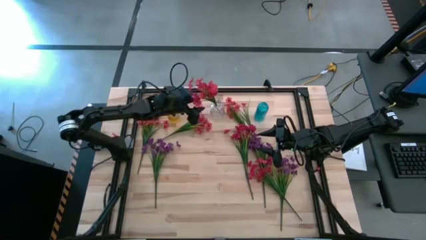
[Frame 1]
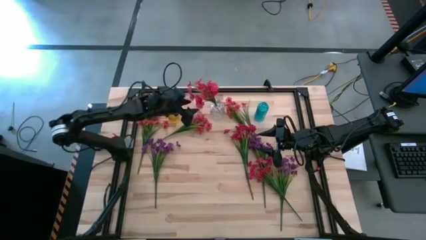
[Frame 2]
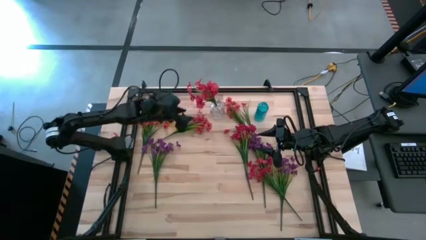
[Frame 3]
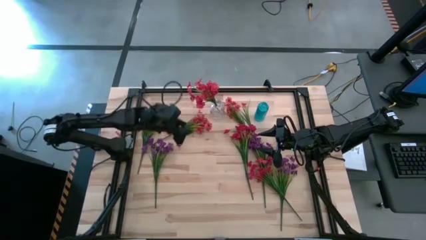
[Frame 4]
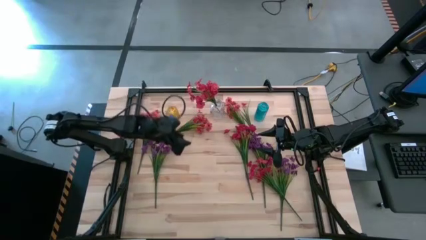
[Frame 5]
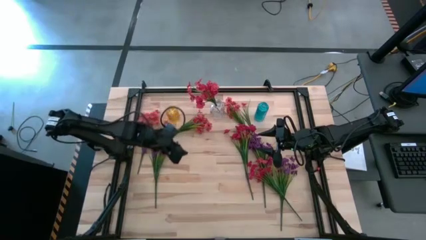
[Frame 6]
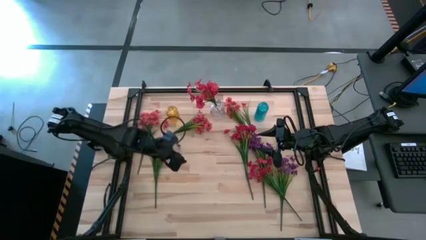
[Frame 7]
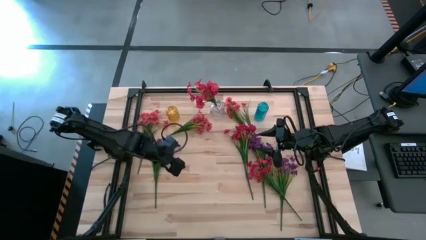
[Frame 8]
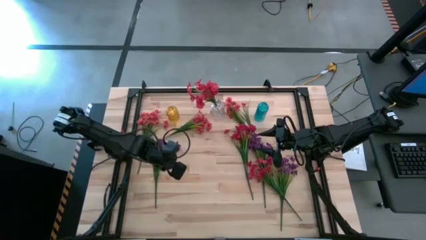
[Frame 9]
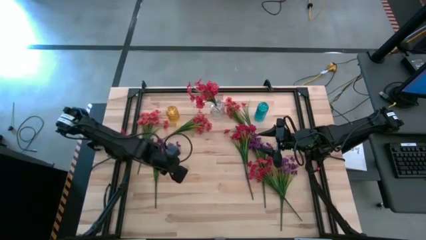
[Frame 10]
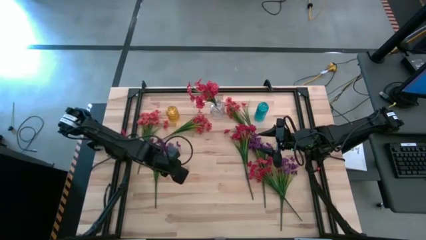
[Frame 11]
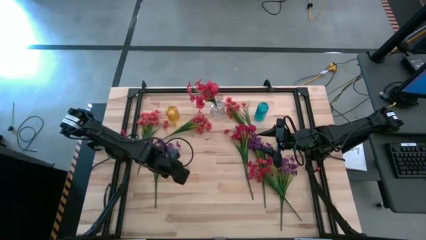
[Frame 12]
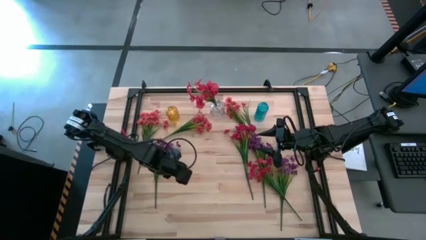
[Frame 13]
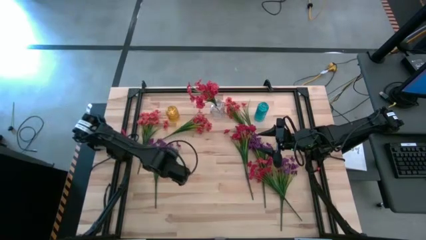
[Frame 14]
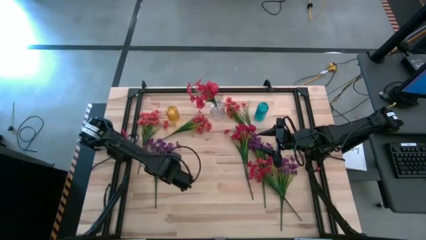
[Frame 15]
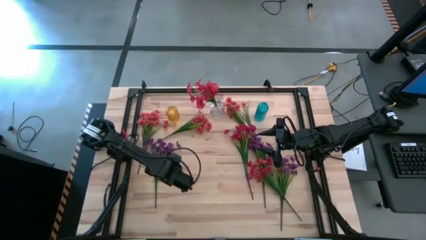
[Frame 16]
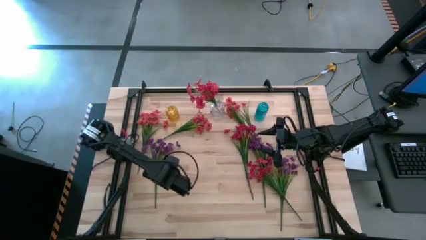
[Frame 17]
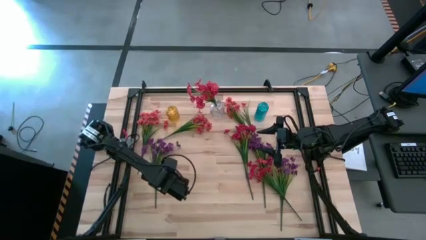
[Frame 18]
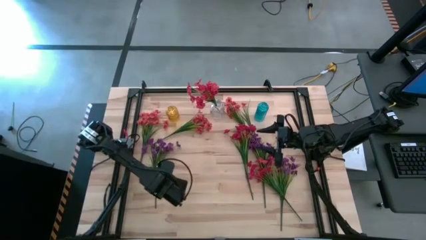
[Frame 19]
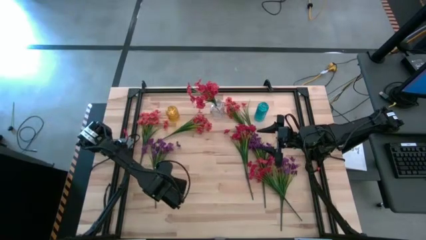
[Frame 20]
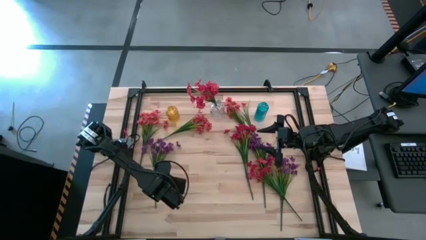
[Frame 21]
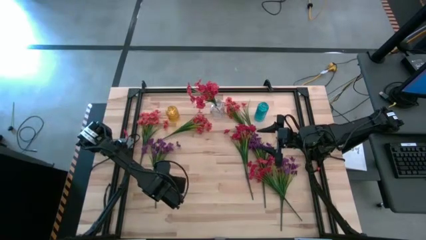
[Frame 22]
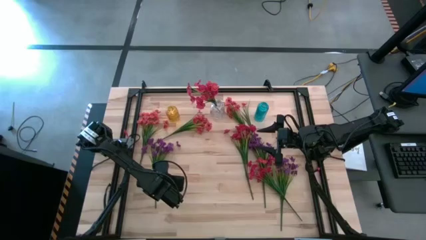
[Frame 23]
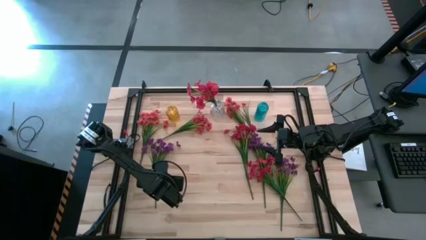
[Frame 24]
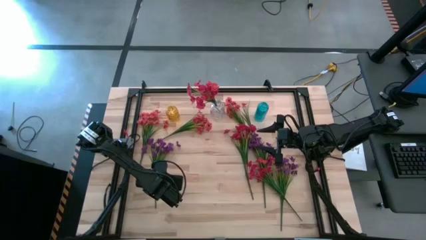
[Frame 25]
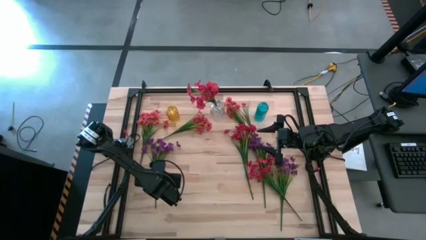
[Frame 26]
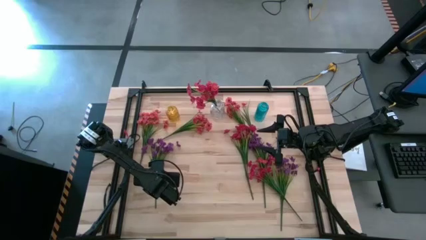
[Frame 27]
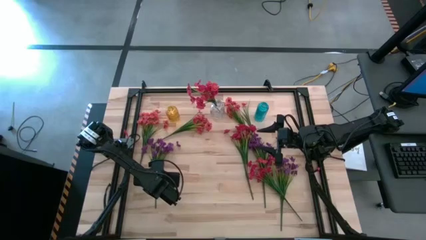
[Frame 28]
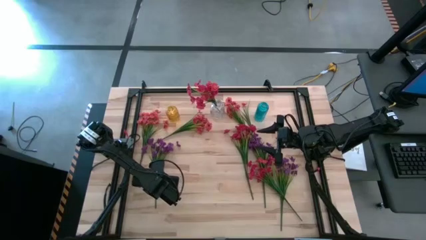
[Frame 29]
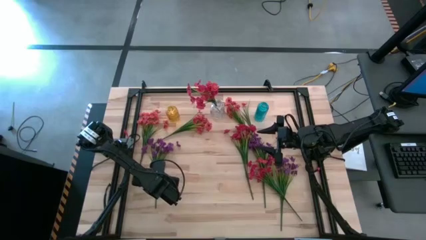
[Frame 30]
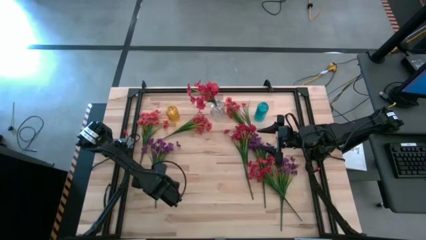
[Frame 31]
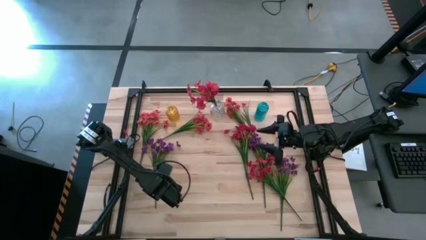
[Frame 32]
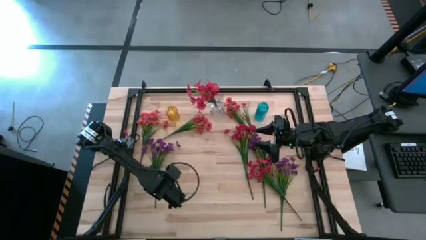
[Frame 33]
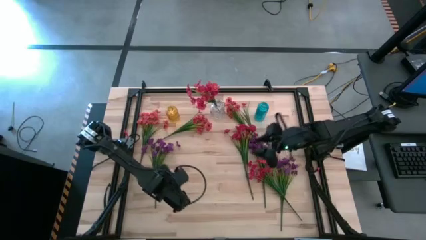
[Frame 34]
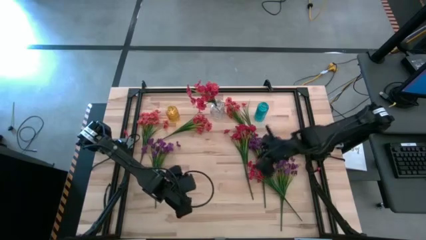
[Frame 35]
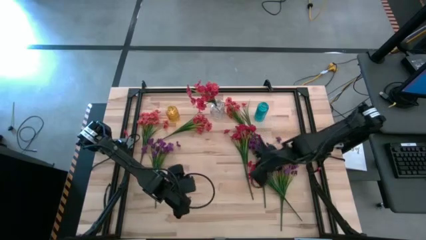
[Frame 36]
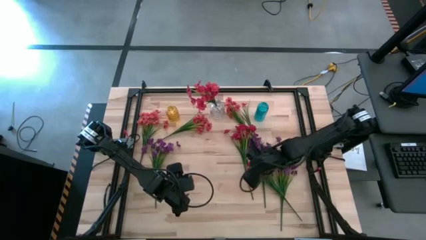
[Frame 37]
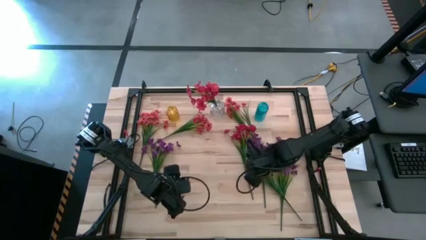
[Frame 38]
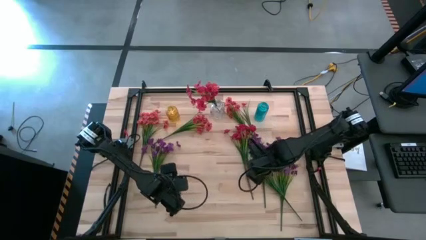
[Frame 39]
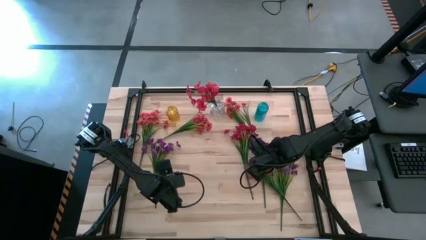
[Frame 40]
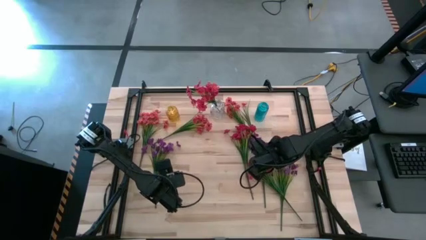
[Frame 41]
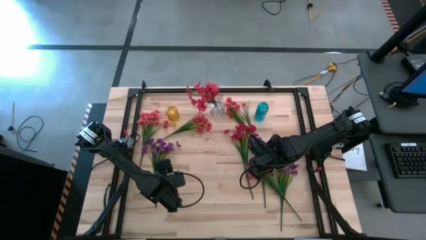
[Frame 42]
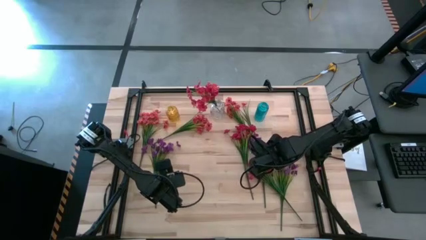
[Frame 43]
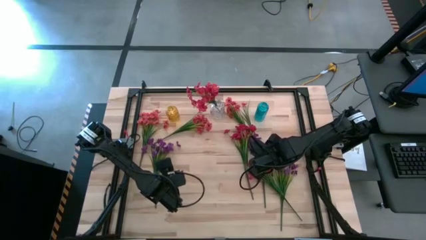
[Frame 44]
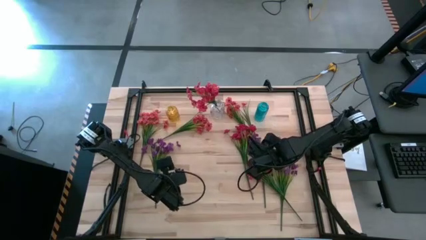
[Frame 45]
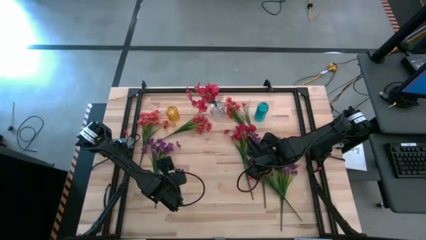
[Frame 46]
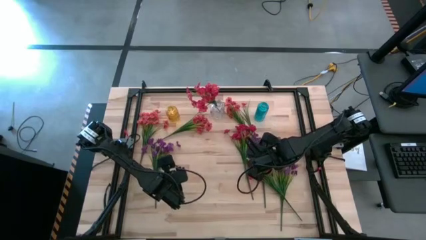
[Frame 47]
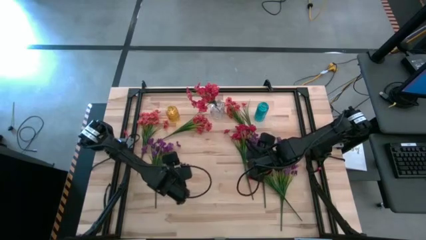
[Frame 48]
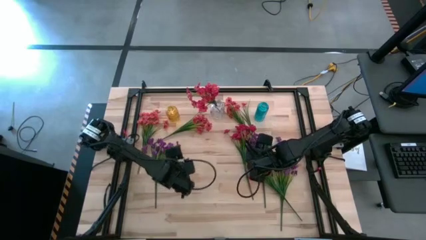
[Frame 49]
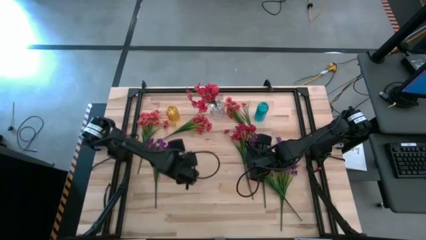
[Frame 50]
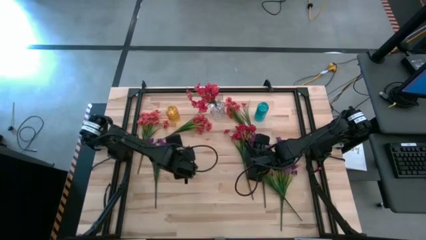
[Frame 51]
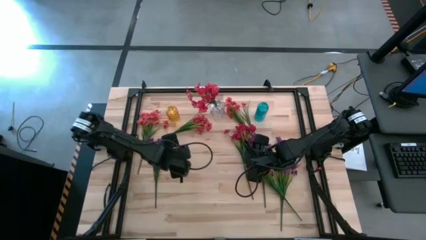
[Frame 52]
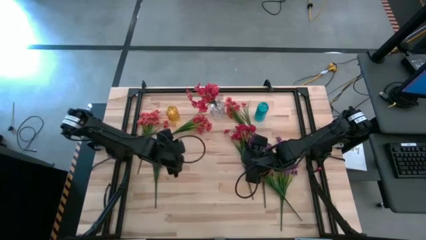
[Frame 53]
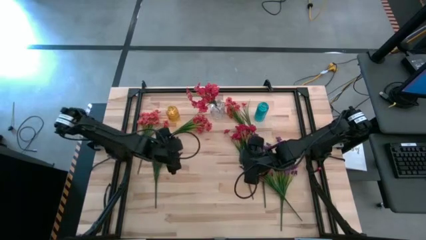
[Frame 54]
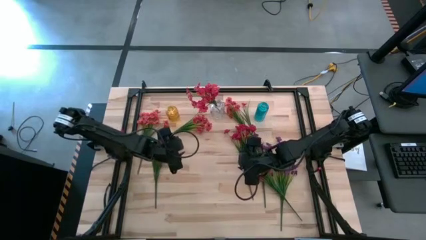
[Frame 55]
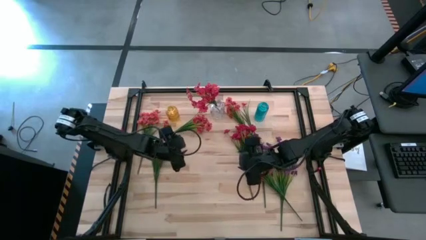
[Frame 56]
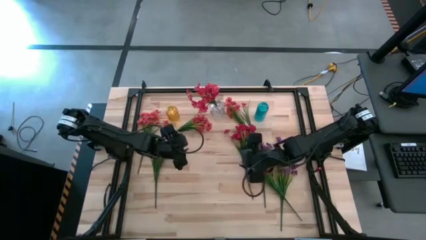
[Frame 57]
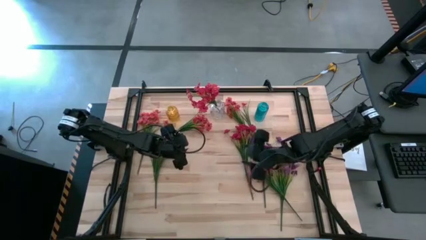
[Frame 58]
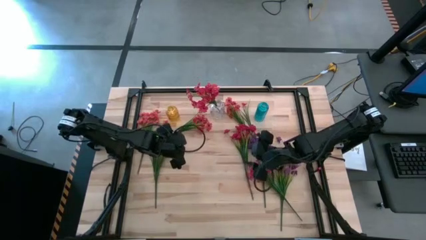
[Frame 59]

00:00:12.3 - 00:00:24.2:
Task: Sort flowers into vase by color
Put the purple flowers into the blue vase
